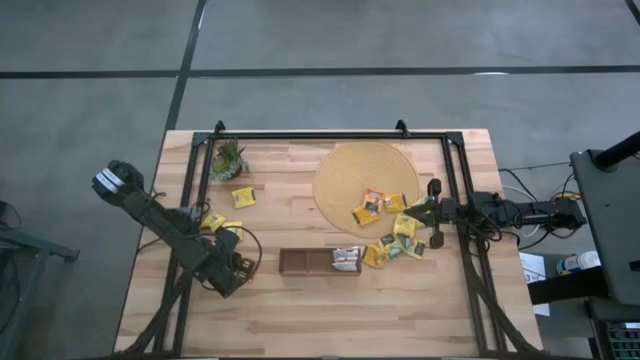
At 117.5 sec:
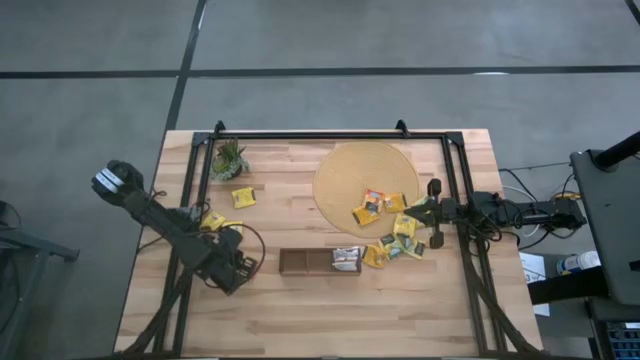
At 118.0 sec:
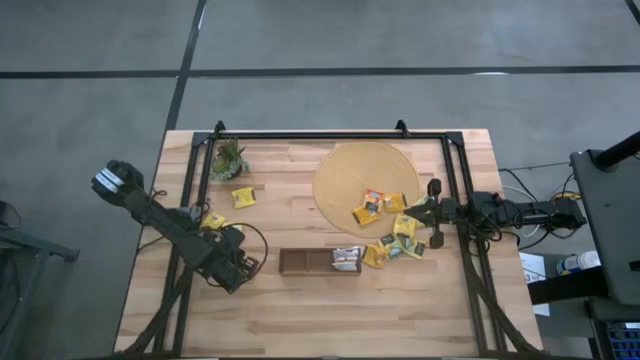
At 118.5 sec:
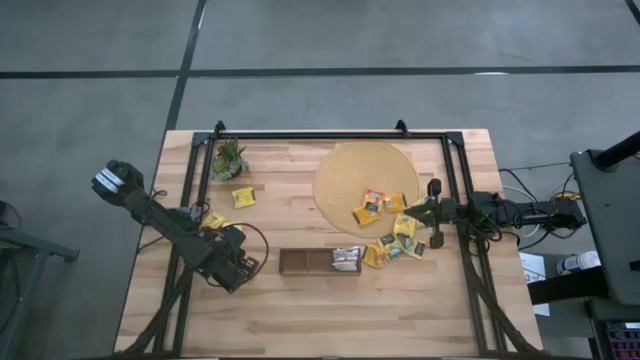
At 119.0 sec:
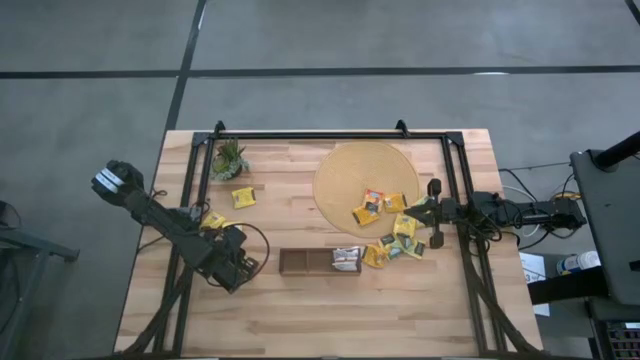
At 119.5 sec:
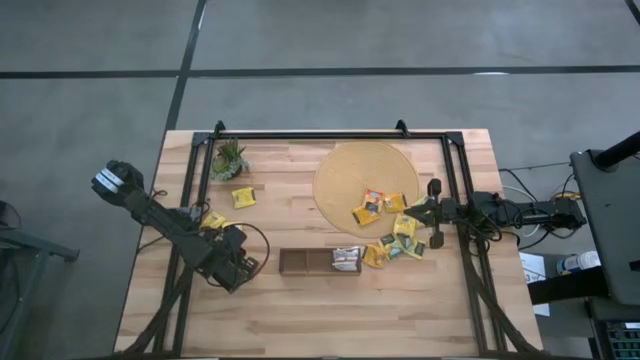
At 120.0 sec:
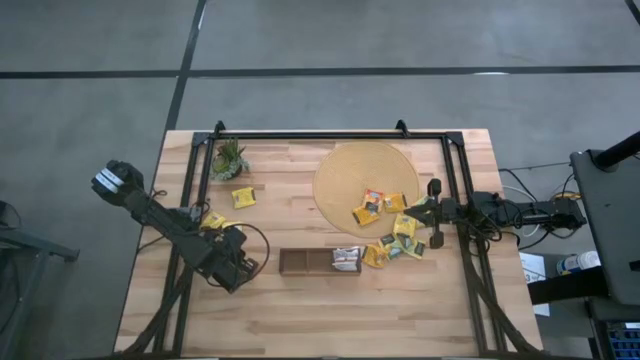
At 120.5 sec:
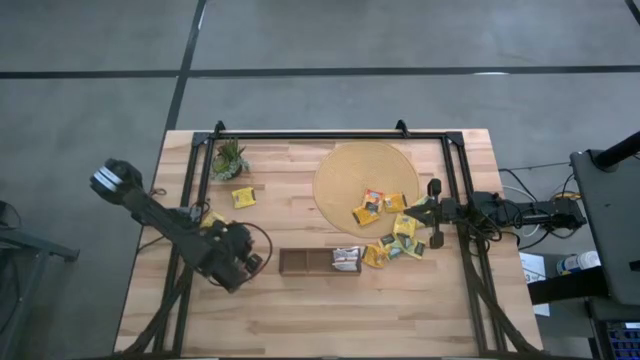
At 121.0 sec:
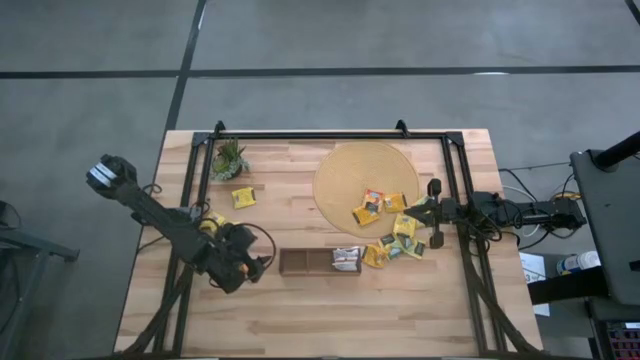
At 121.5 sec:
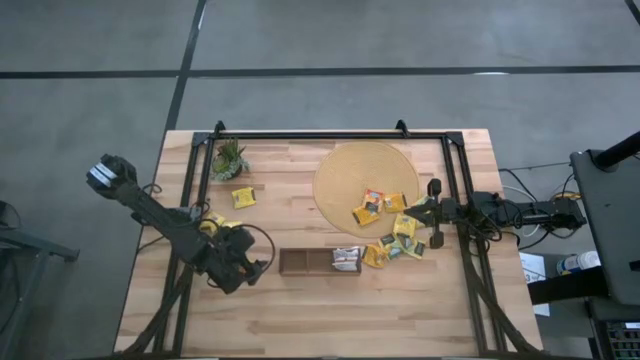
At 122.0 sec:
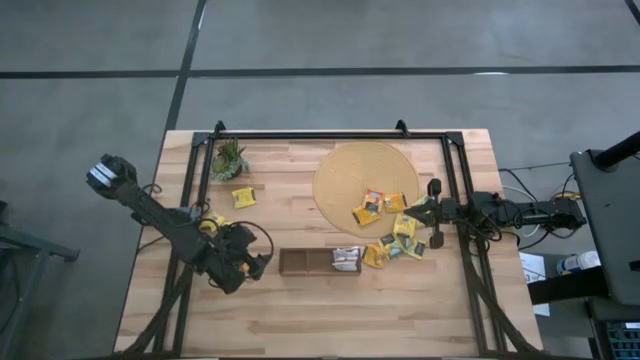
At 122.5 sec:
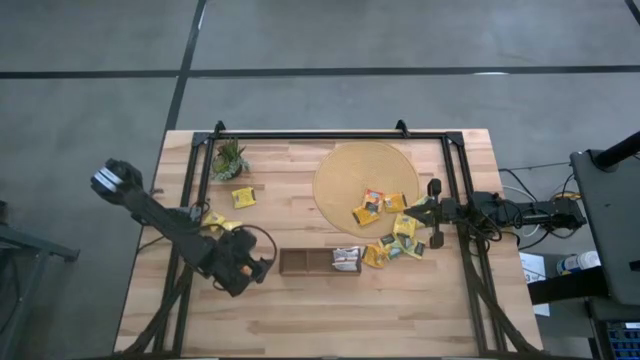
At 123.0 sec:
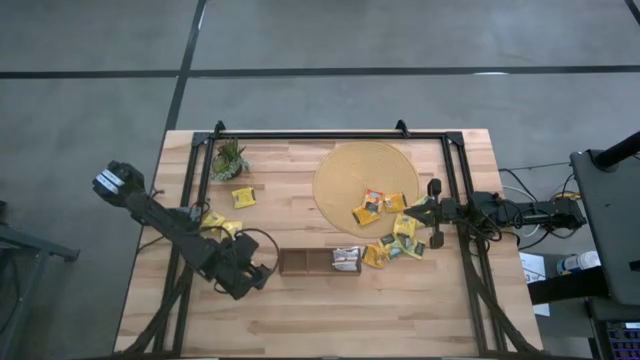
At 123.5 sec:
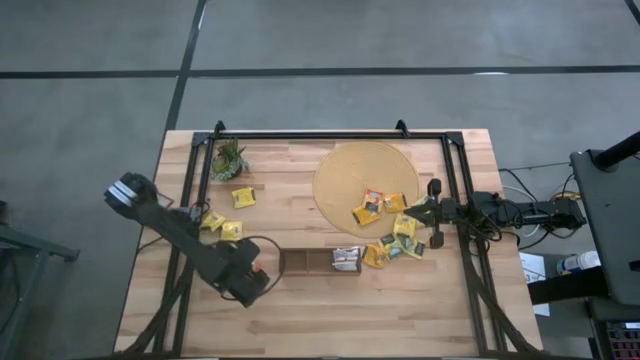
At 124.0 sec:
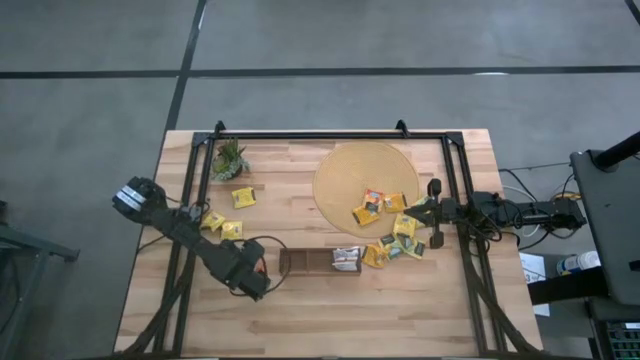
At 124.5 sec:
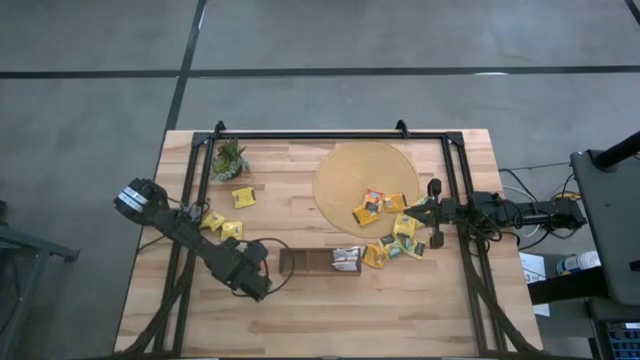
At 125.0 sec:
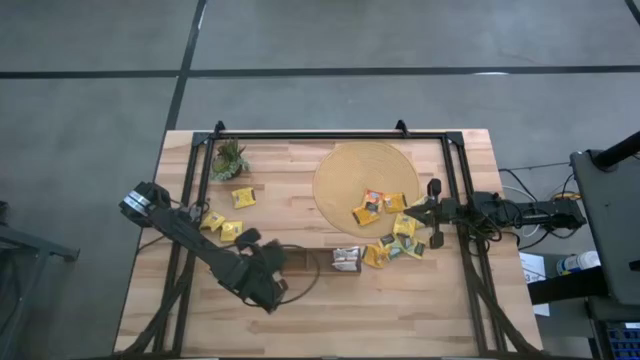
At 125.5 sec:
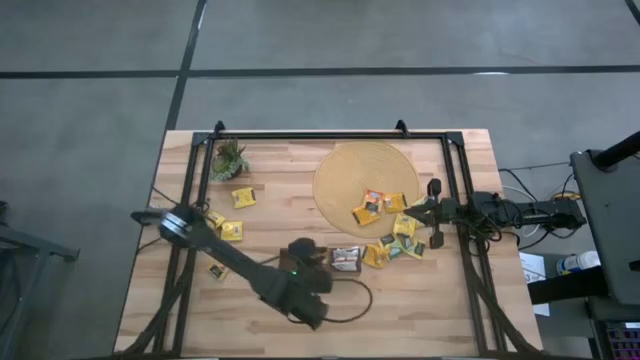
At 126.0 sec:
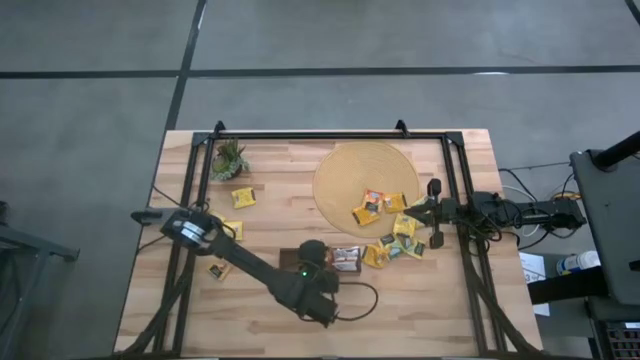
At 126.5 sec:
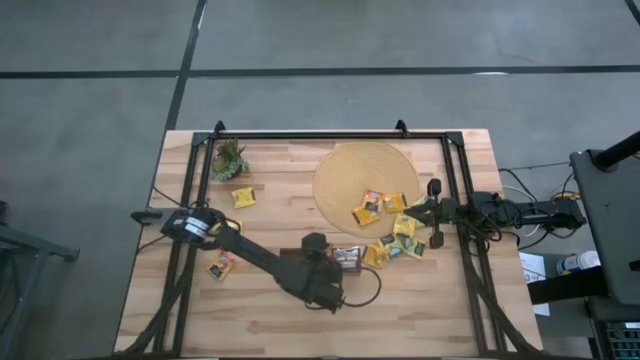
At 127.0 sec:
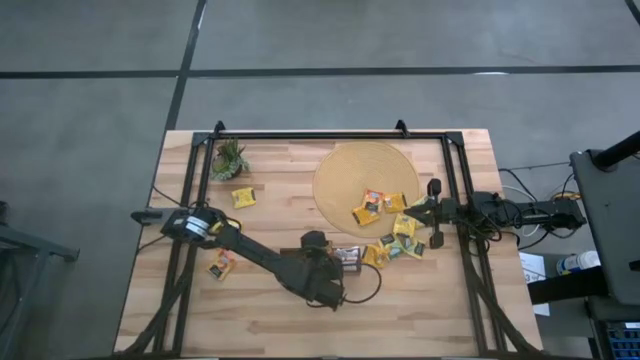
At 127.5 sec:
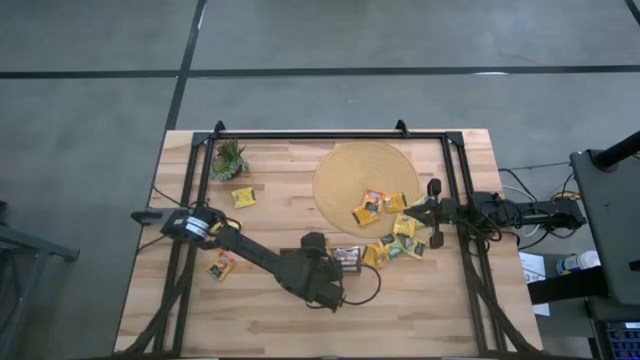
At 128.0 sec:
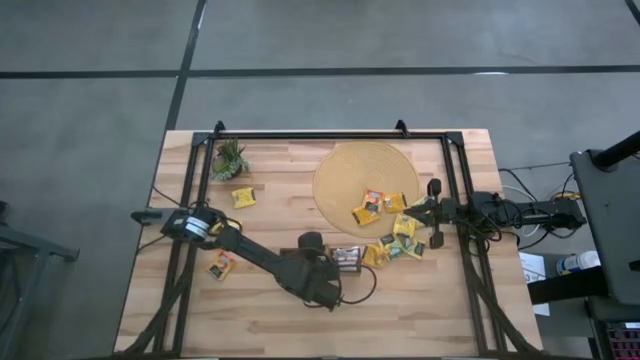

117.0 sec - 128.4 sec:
Task: Pick & Place Tea
Put the orange tea bag into the middle section of the wooden organizer

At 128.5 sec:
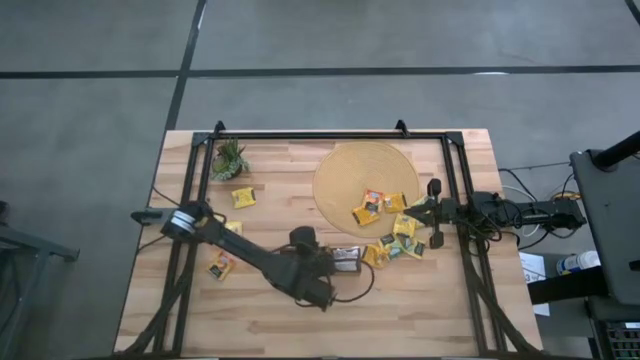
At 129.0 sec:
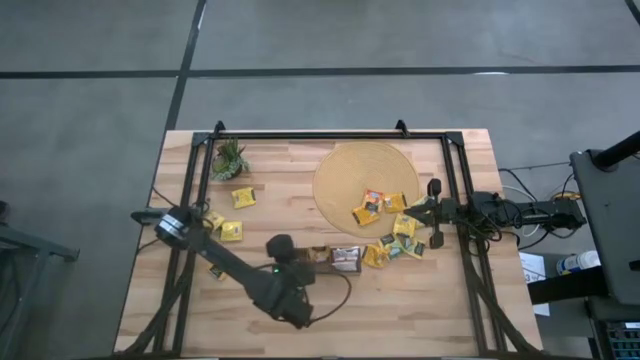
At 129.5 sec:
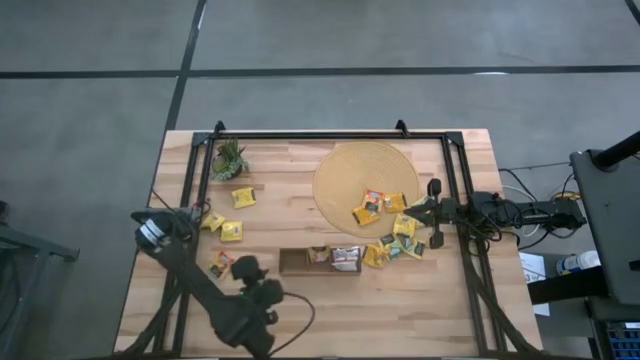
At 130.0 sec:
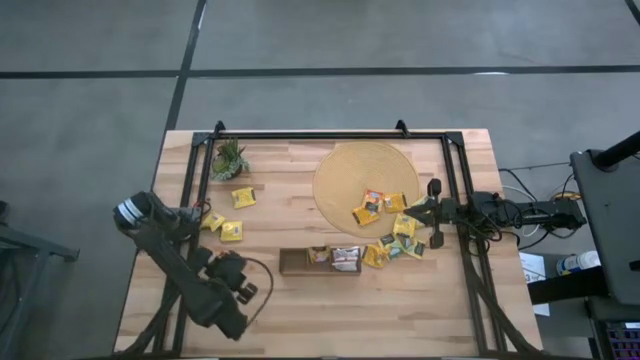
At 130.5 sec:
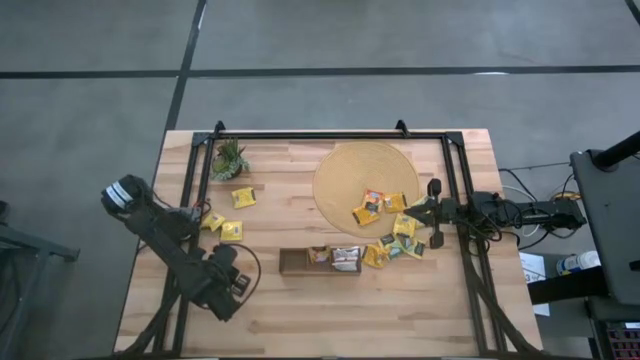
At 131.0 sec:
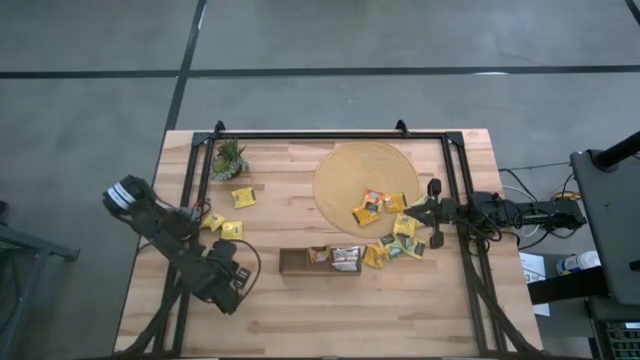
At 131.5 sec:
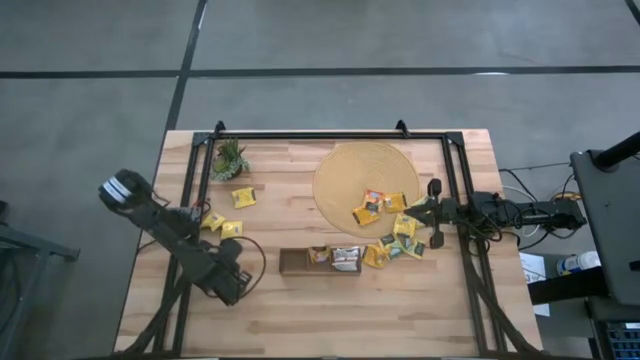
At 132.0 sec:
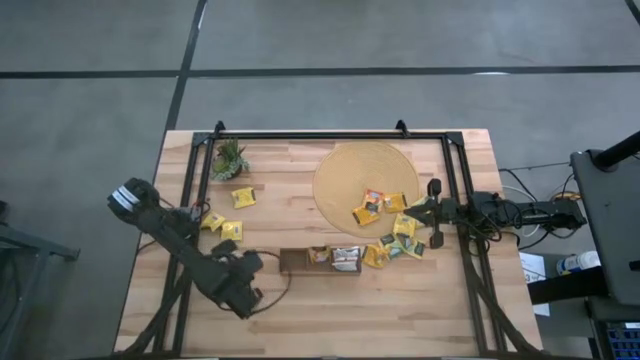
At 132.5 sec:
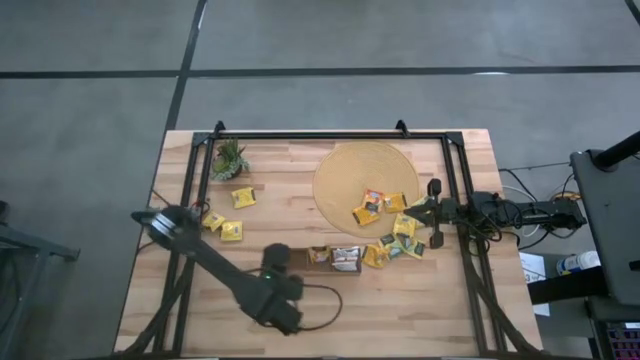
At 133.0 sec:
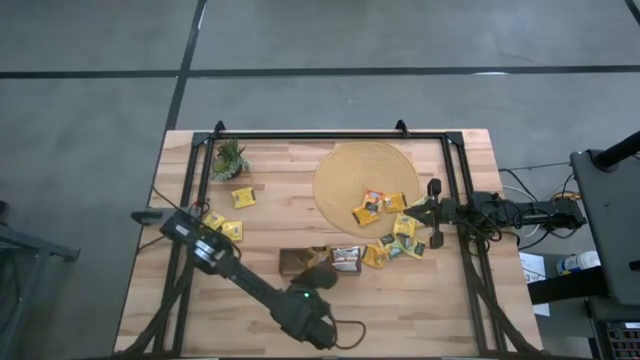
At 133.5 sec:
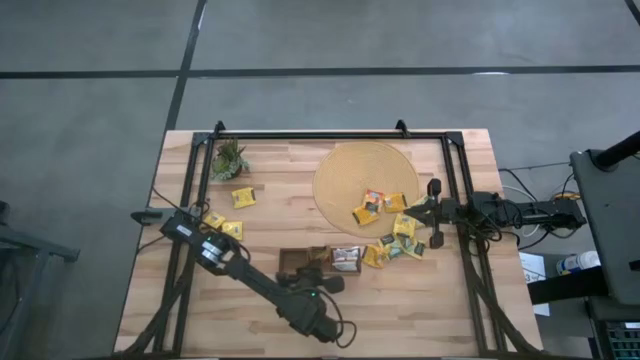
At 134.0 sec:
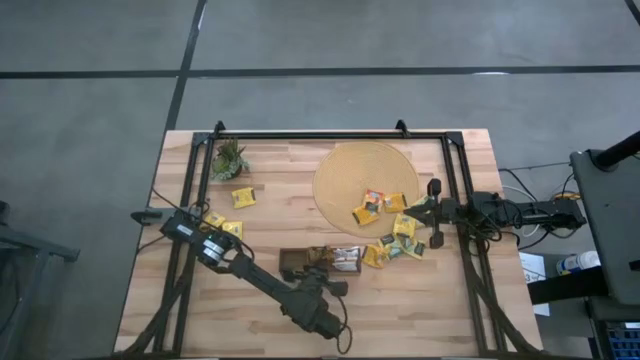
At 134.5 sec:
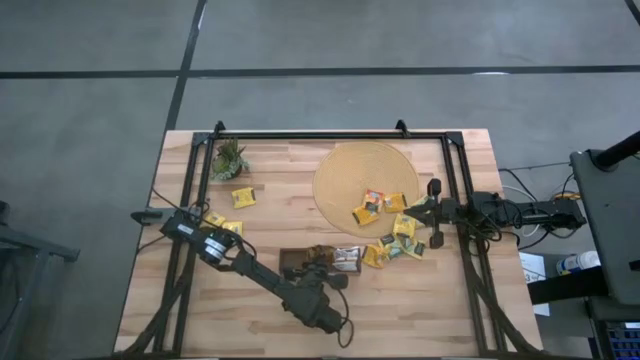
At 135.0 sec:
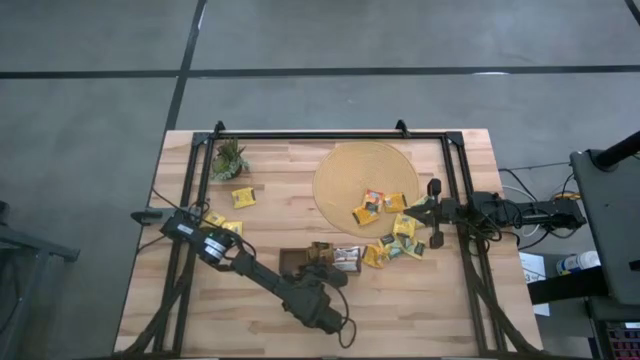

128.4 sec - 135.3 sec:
Put the orange tea bag into the middle section of the wooden organizer
